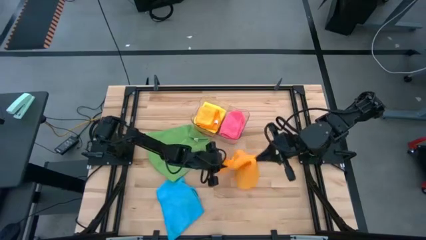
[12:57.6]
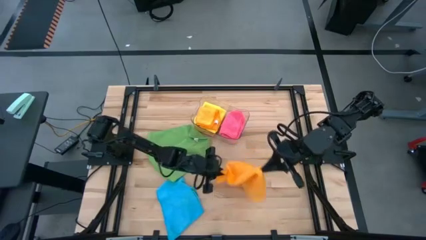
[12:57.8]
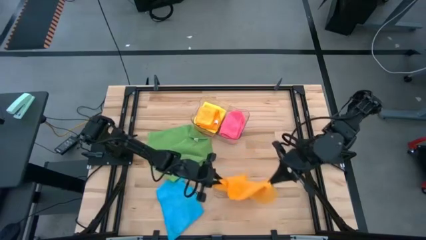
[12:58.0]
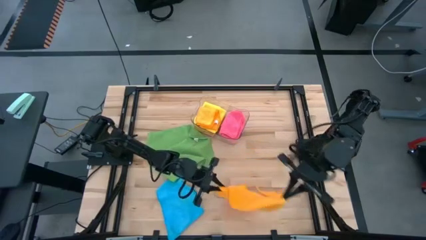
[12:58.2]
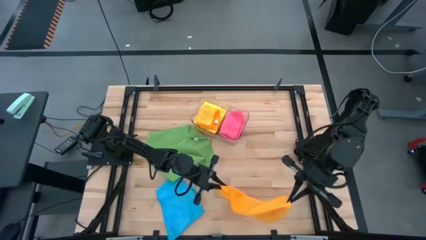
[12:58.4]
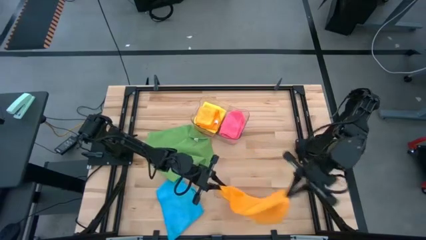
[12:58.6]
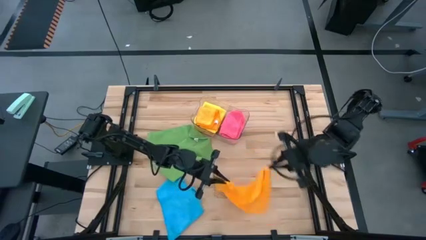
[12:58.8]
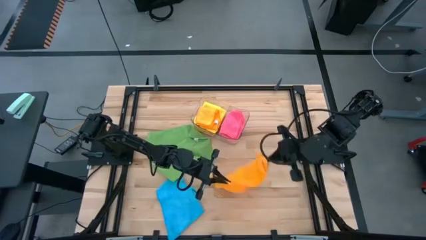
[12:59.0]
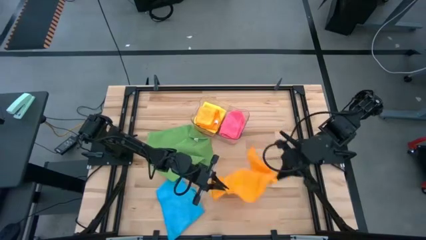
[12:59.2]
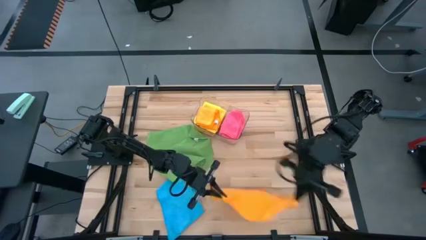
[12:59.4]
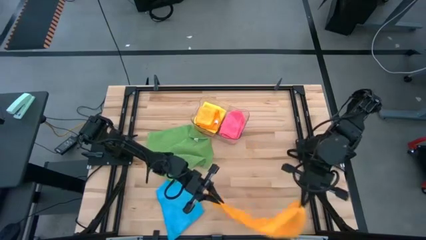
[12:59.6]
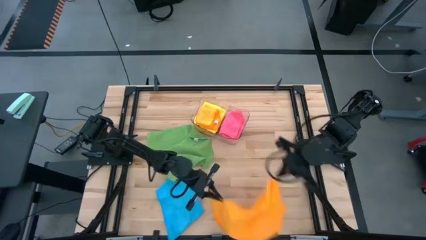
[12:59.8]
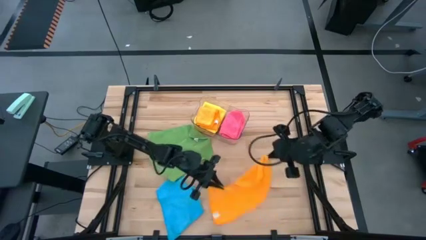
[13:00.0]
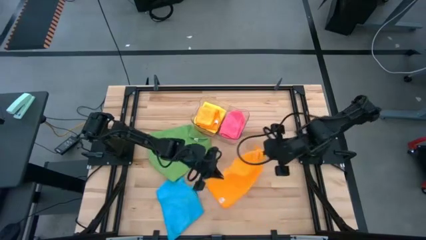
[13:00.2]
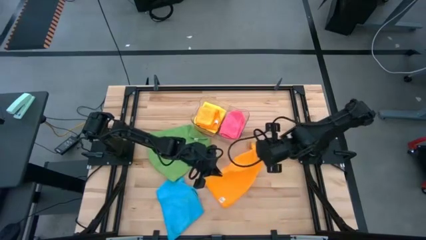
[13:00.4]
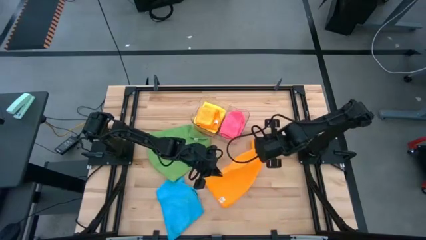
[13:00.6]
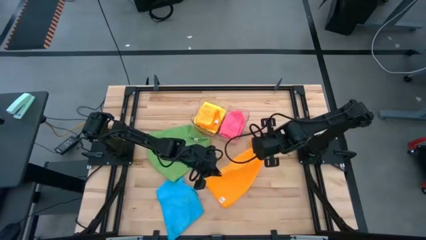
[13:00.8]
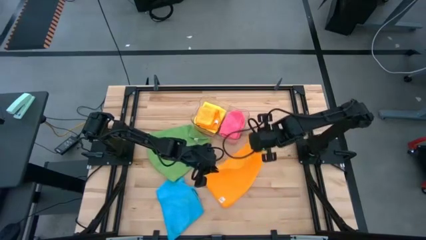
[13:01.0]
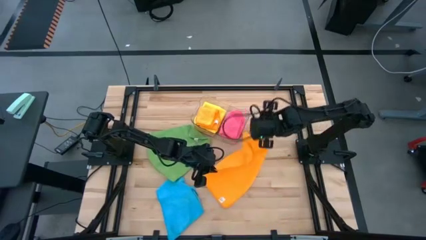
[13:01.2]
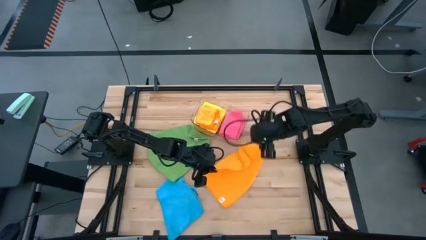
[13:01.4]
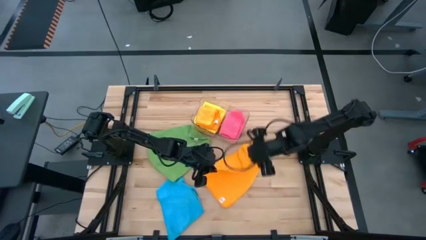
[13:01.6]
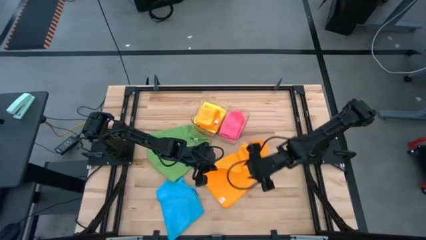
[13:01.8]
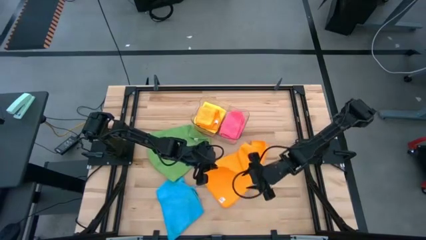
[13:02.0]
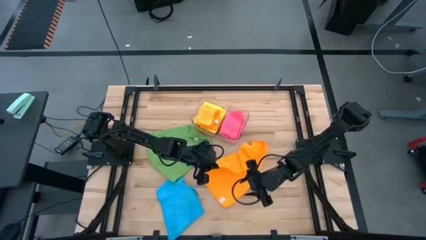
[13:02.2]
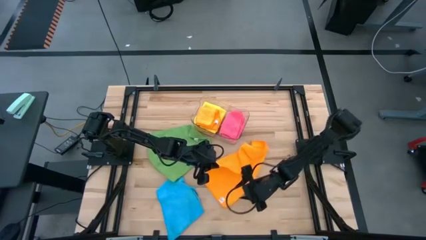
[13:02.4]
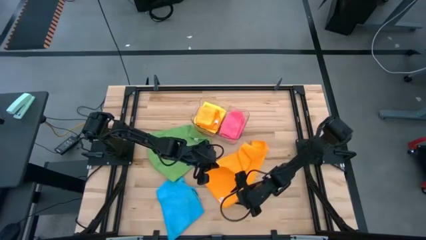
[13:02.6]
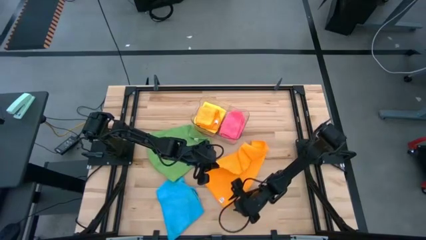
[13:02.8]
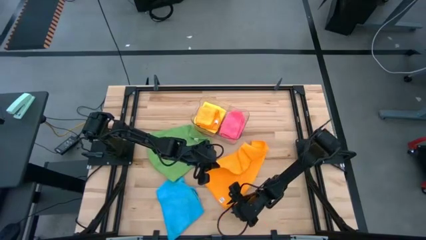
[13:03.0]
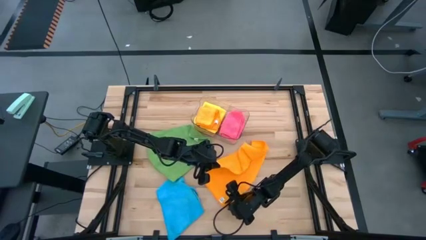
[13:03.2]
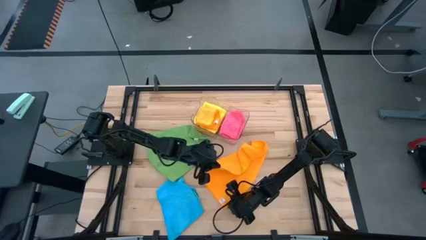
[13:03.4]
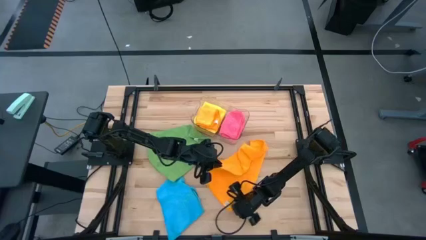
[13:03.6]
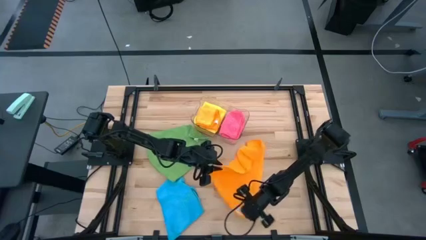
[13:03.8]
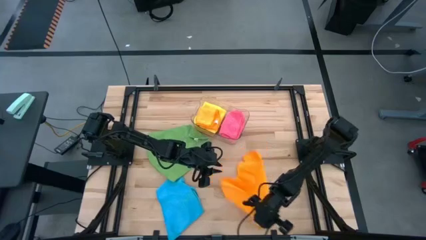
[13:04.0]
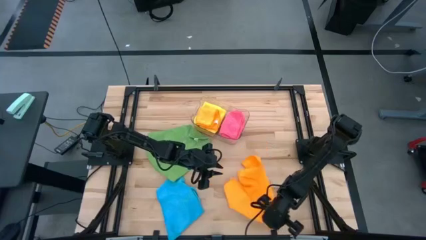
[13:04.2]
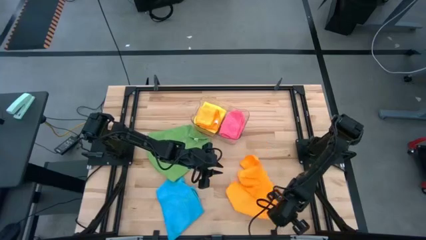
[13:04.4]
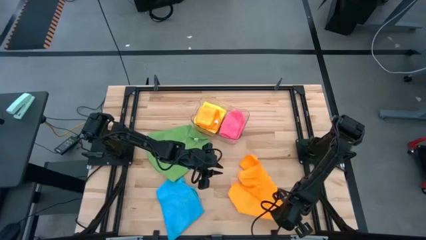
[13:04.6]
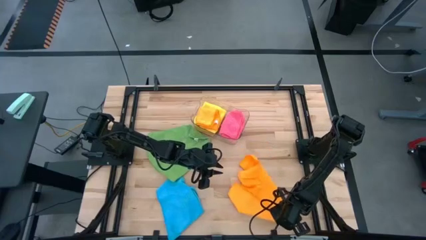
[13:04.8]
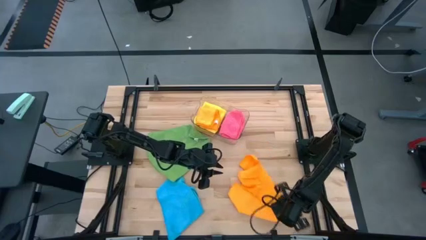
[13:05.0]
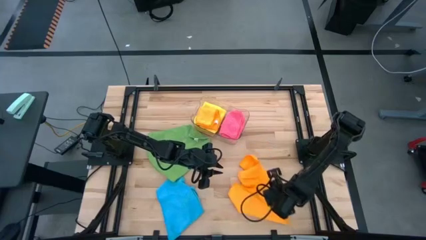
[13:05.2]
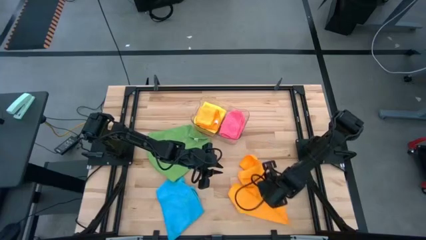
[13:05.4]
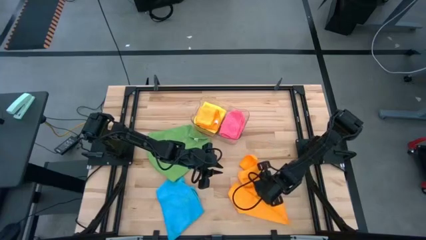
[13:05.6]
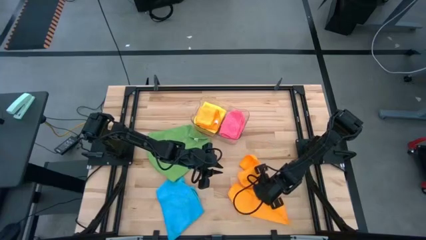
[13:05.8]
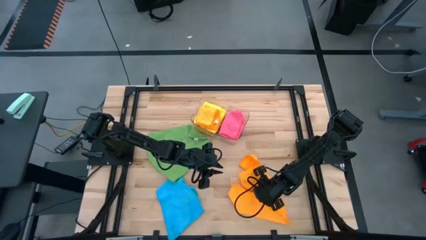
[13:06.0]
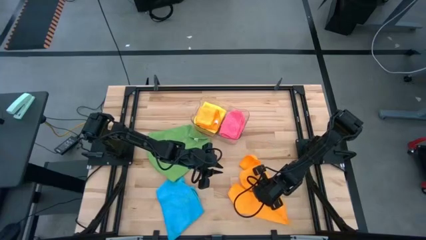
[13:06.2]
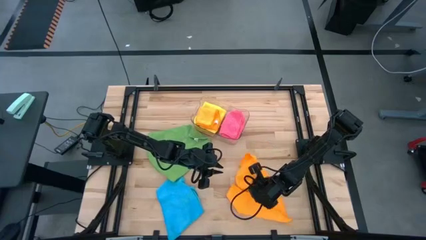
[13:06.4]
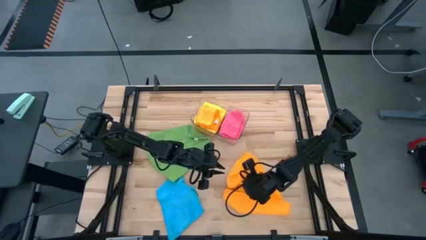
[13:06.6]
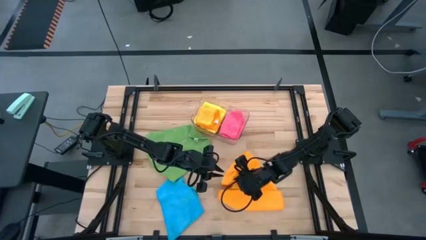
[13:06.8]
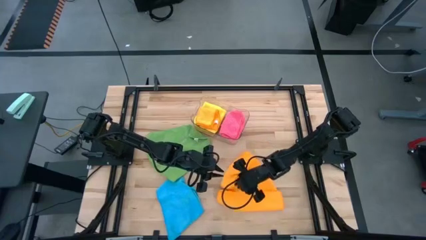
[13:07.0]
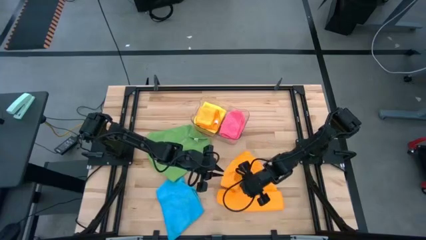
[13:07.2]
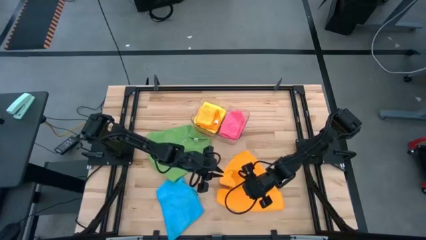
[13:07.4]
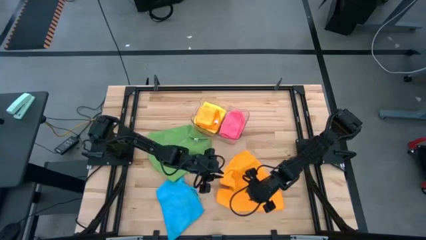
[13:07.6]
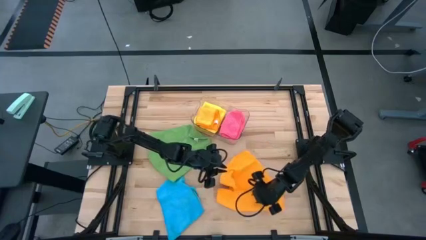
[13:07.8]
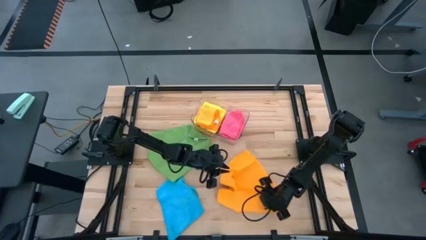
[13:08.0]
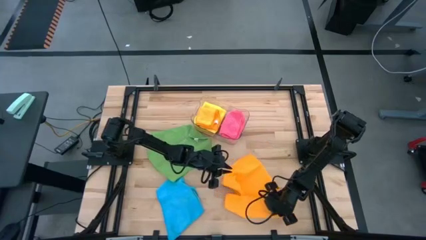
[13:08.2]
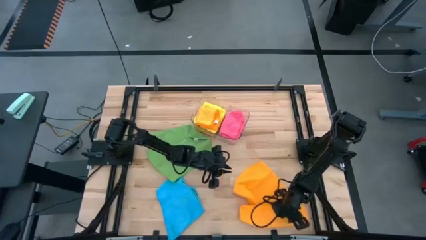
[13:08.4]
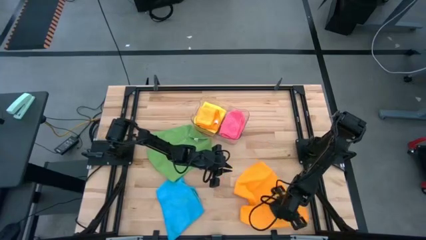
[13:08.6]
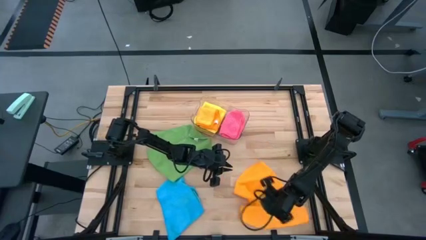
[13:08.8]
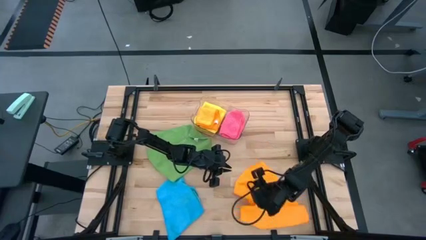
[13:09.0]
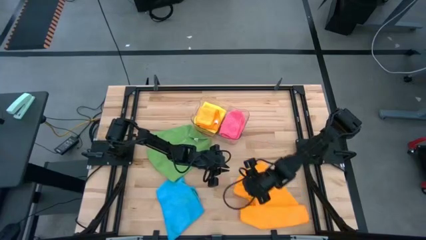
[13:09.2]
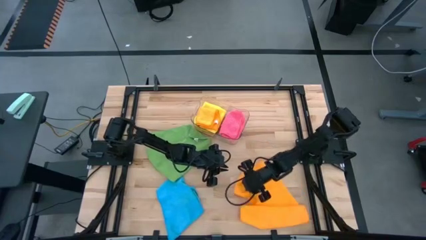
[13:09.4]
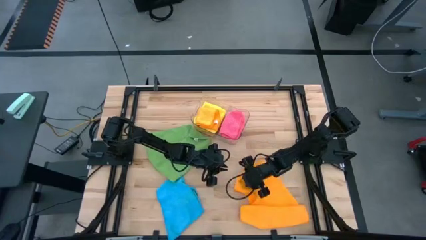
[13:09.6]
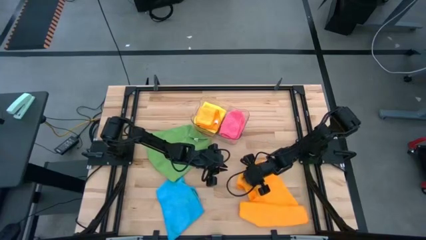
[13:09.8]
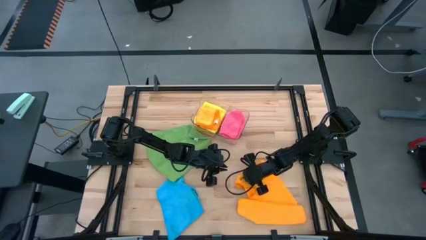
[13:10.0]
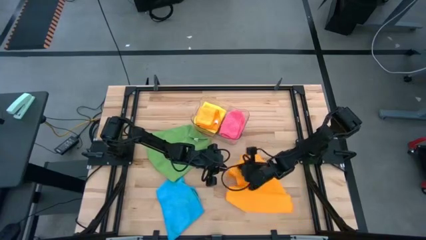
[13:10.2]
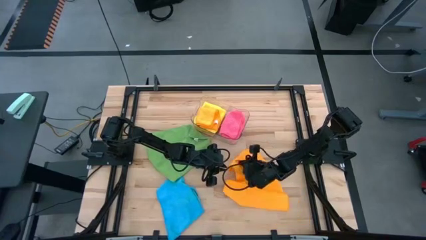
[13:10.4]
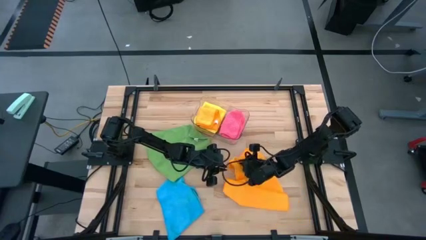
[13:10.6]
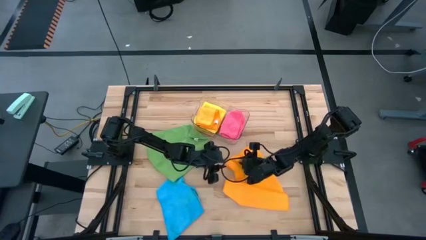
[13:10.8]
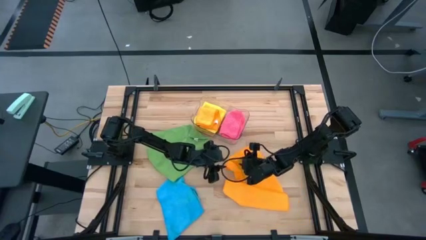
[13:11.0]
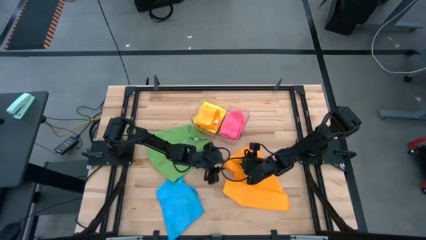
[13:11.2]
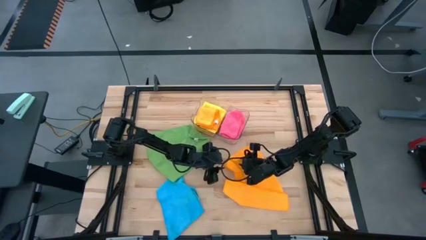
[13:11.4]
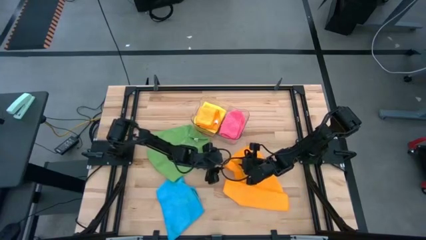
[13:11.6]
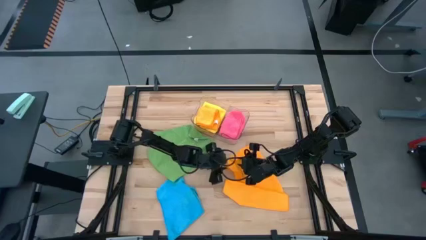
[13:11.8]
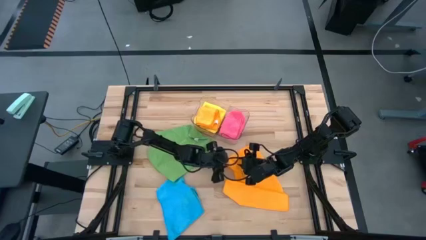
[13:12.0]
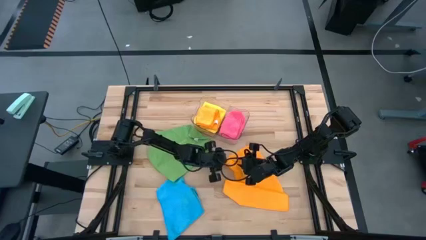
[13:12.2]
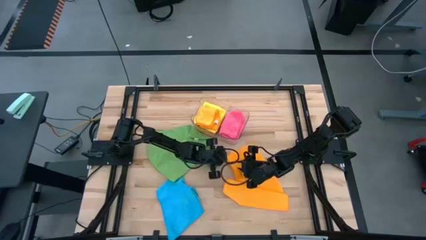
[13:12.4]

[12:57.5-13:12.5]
Task: Fold microfiber towels
Fold the orange microfiber cloth
